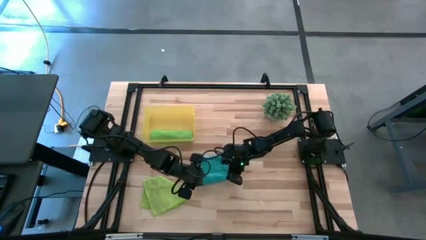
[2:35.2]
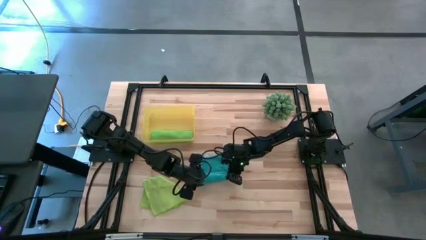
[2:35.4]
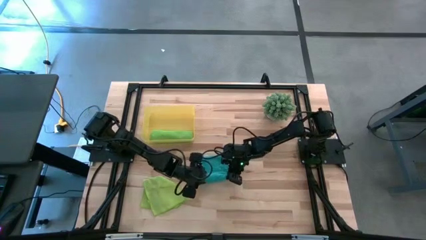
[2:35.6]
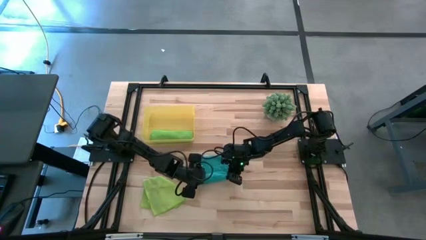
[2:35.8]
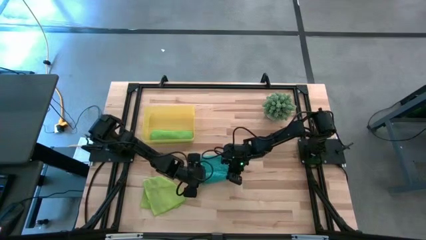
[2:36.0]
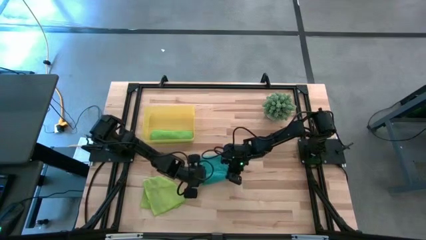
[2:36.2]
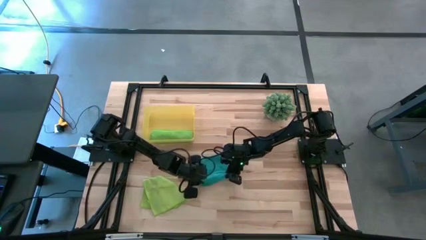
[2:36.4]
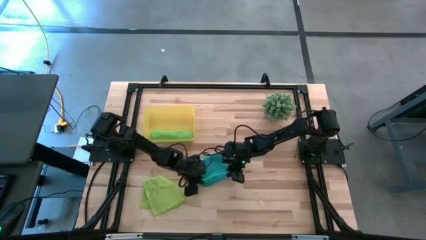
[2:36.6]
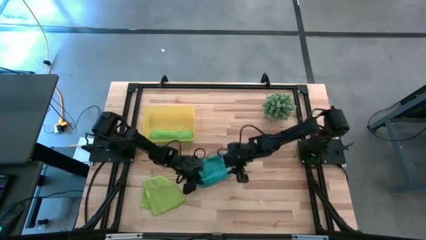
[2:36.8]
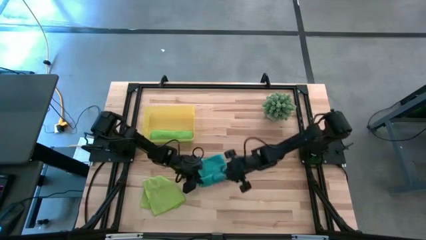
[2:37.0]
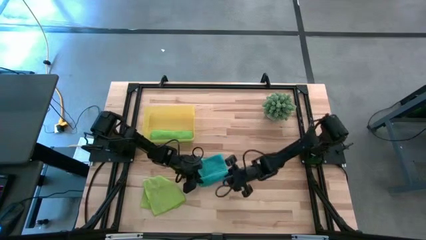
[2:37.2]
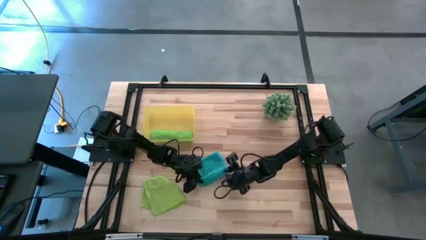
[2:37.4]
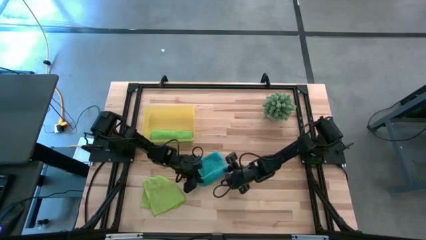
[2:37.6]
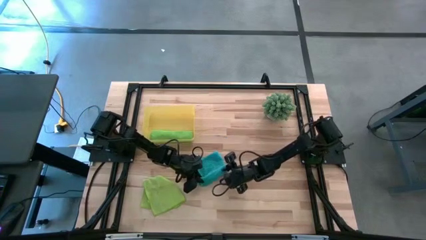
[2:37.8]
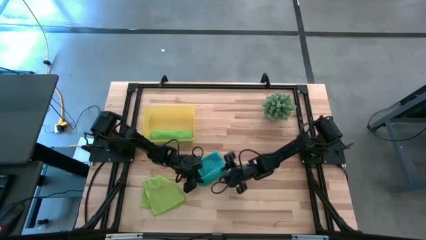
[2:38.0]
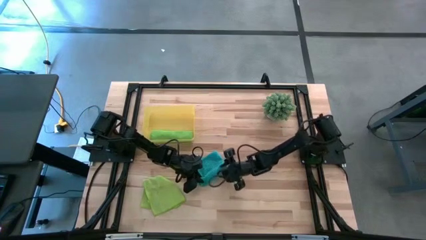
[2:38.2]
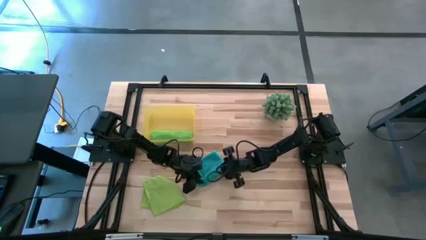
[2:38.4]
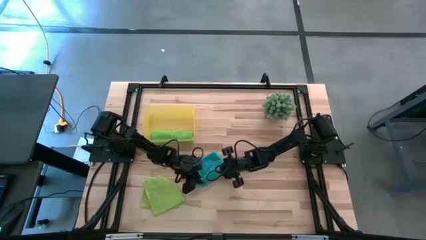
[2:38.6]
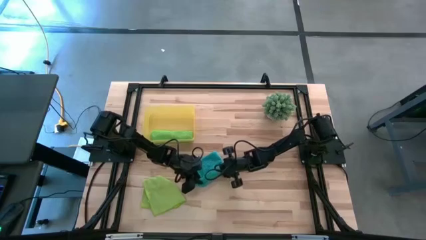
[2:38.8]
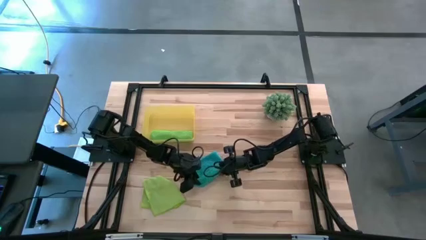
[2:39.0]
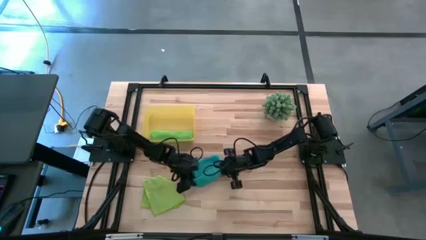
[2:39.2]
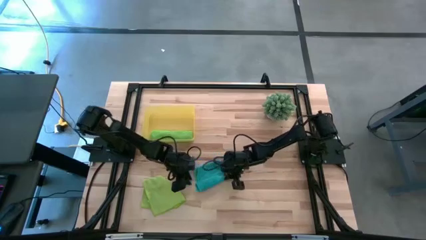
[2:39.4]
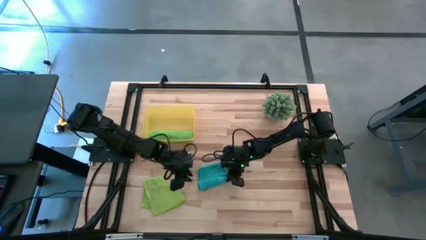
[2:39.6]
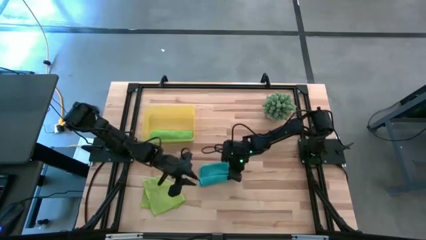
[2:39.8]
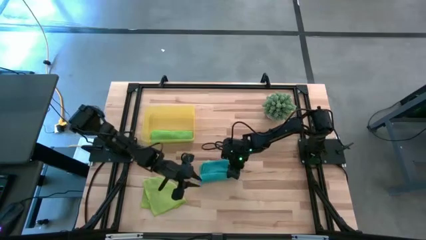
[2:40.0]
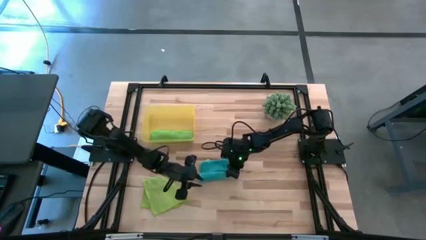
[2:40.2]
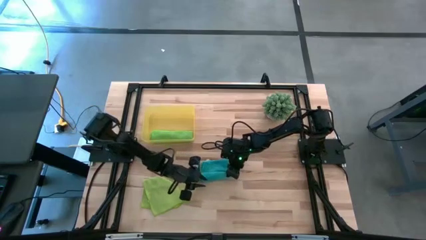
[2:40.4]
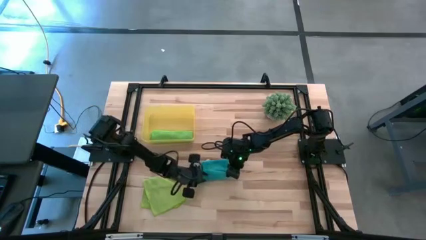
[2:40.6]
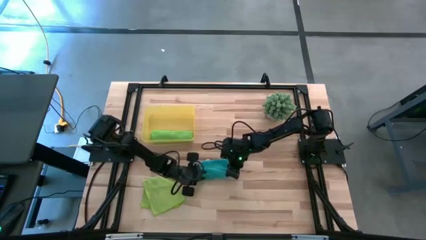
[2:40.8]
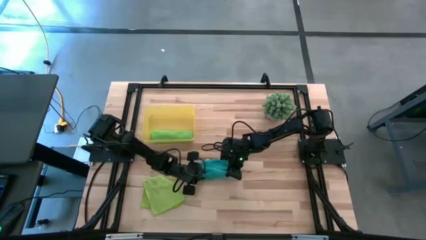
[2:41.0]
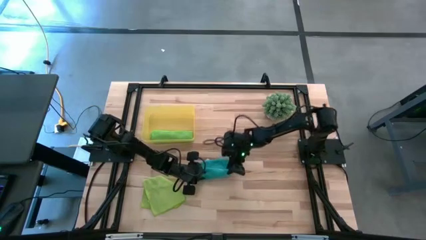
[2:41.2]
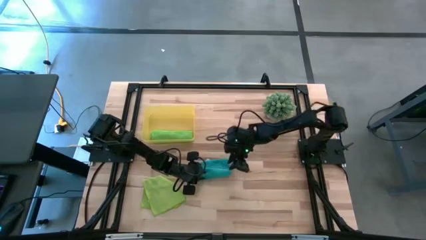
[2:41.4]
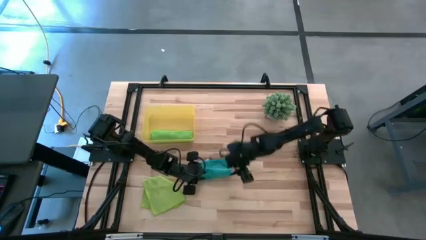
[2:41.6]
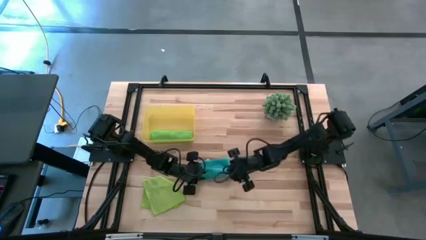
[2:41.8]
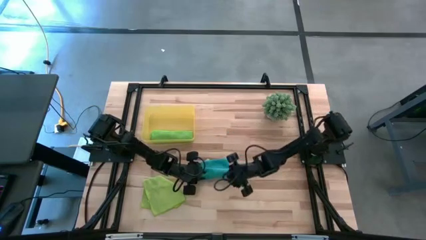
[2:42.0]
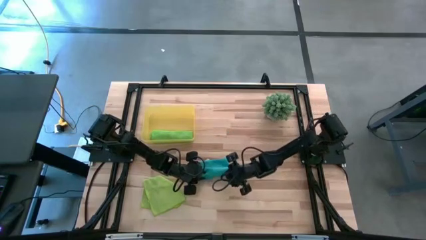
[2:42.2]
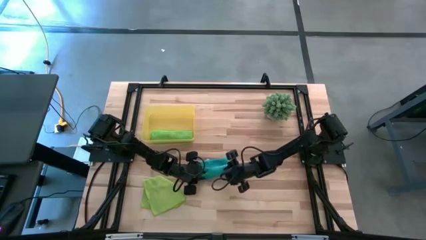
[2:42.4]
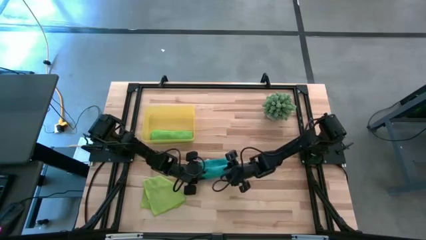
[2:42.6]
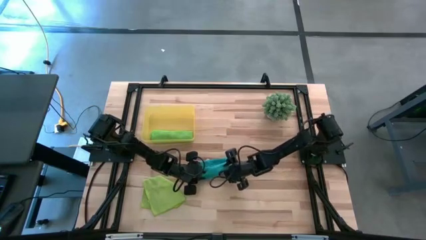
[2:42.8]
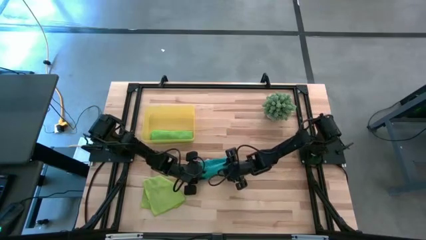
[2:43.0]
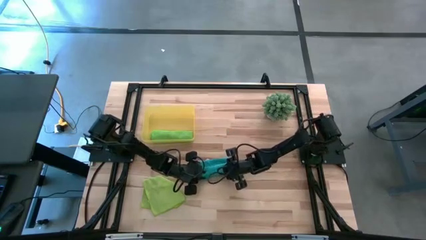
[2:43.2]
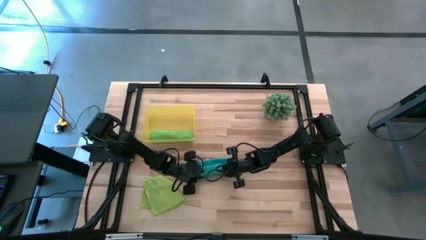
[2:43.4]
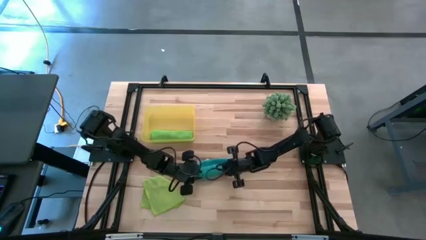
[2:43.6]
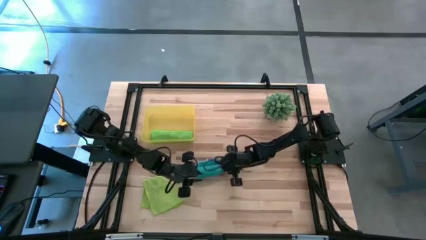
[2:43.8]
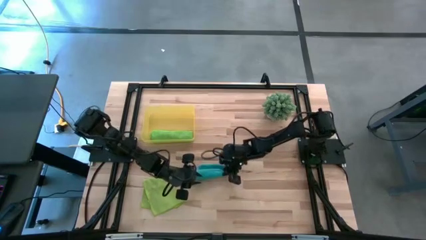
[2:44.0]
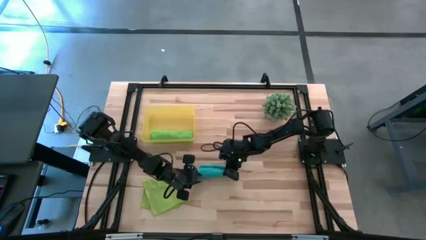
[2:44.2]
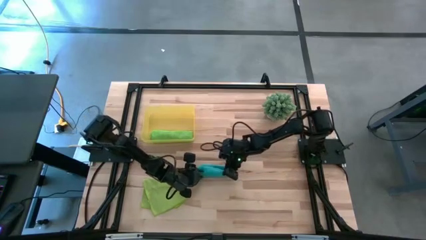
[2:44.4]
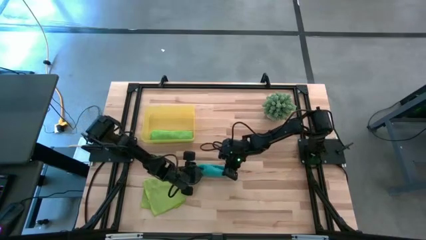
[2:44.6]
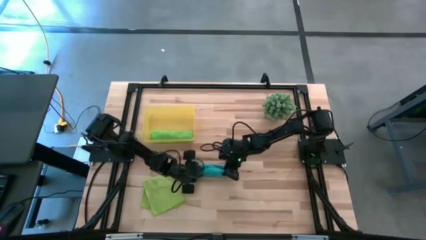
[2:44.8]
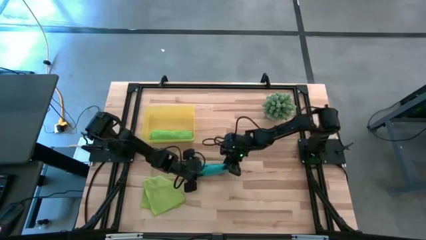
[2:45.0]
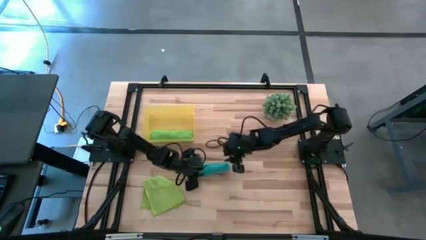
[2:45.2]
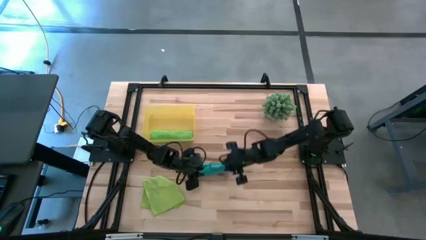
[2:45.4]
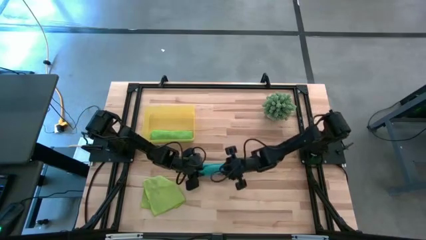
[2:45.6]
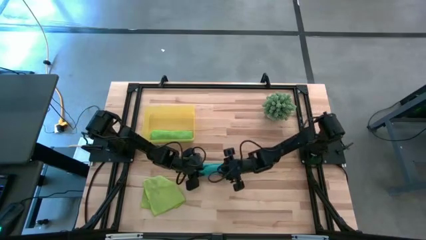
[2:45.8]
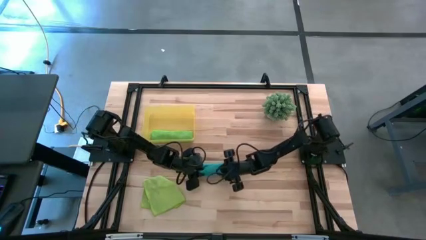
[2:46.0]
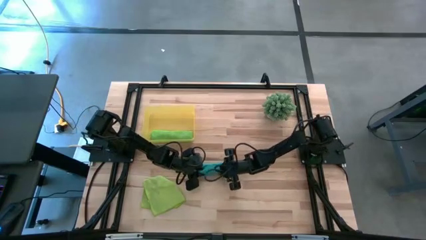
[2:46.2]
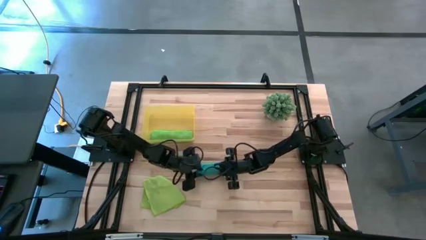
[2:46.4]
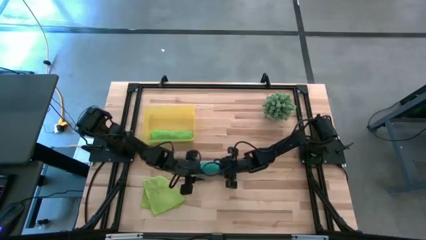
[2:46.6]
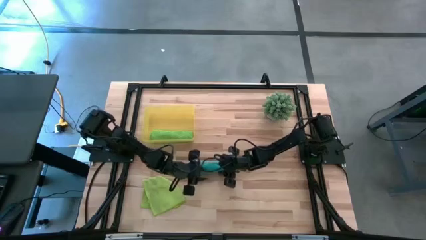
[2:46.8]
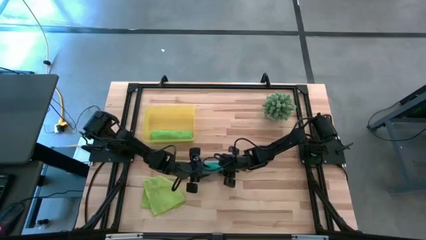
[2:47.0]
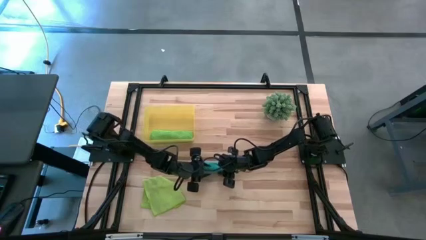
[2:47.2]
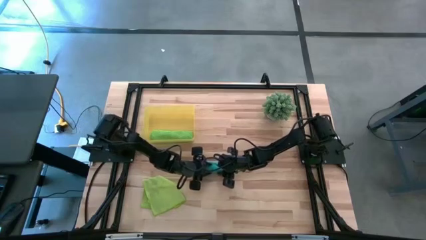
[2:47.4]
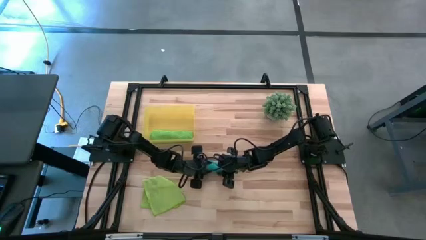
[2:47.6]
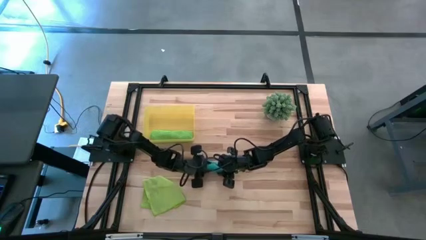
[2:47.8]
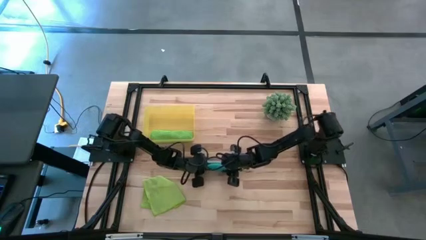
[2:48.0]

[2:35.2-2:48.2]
Task: Roll microfiber towels into tight, uniform cylinder then place into a basket
Roll the blue microfiber towel

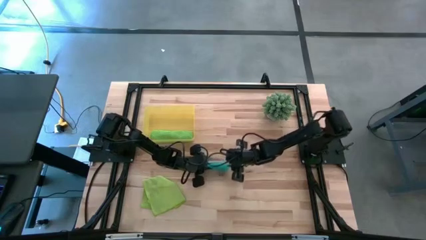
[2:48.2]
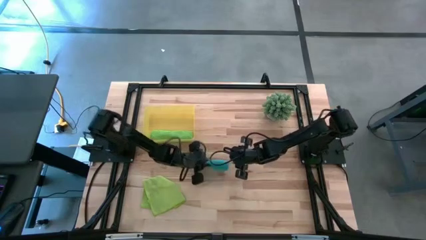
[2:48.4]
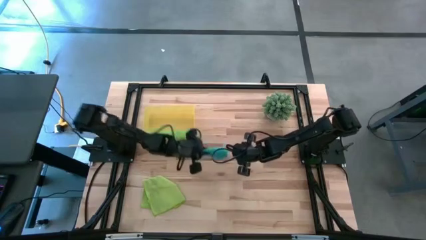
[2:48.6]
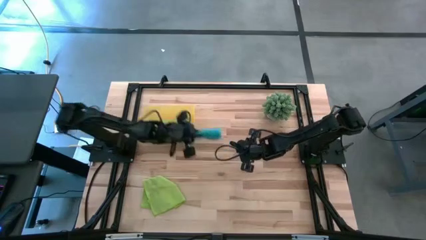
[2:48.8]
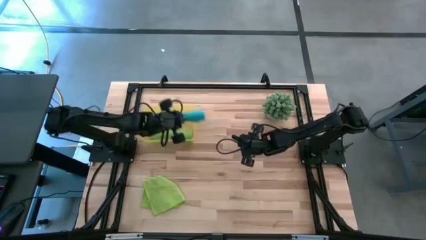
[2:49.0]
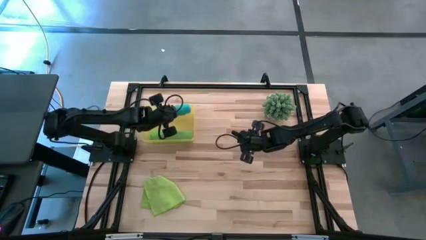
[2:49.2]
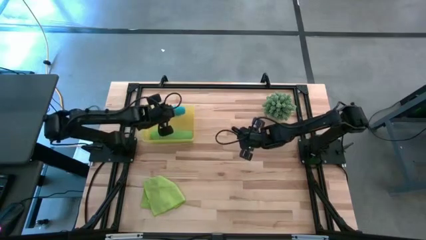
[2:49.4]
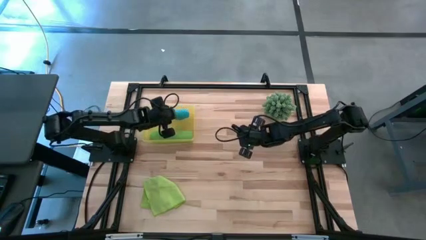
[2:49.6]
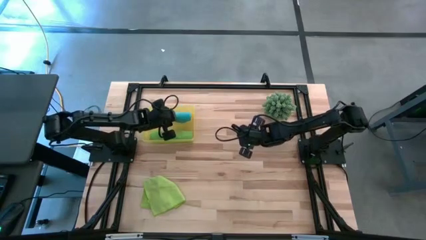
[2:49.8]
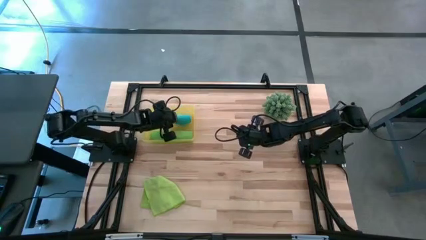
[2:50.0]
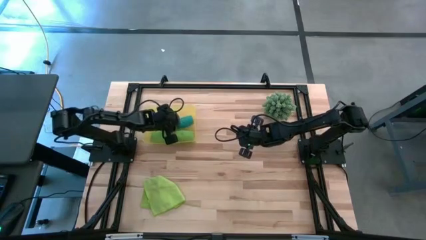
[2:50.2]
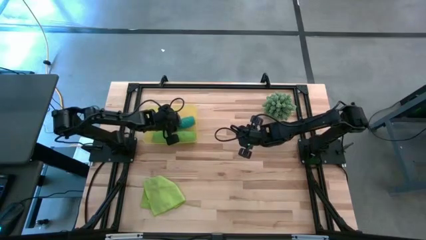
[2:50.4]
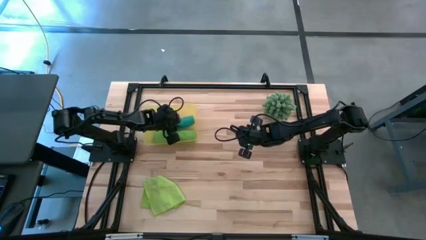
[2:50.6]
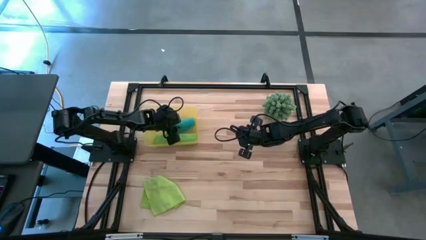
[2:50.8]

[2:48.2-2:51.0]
Put the blue microfiber towel into the yellow bin
